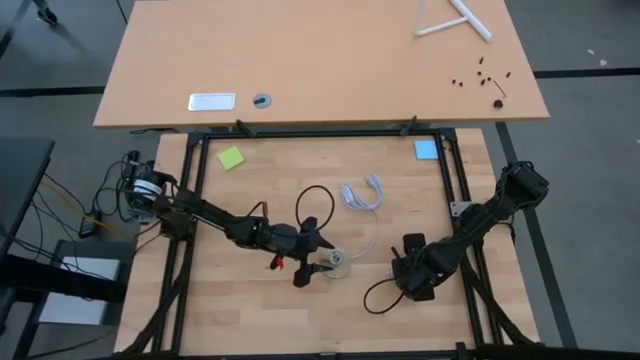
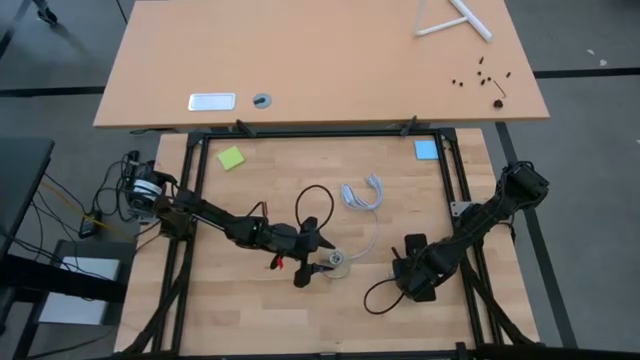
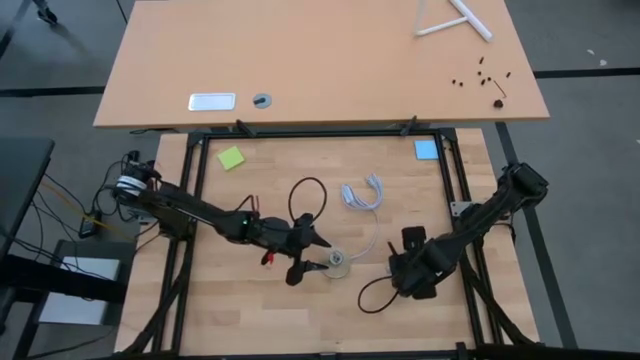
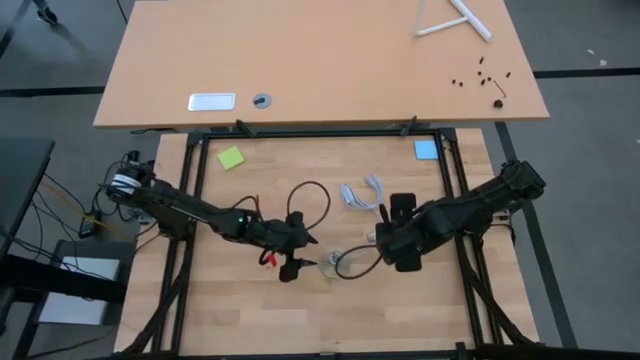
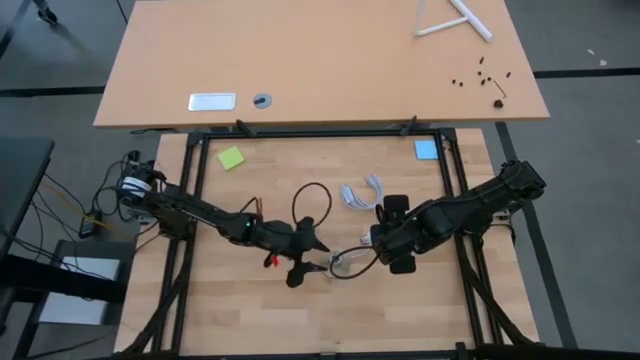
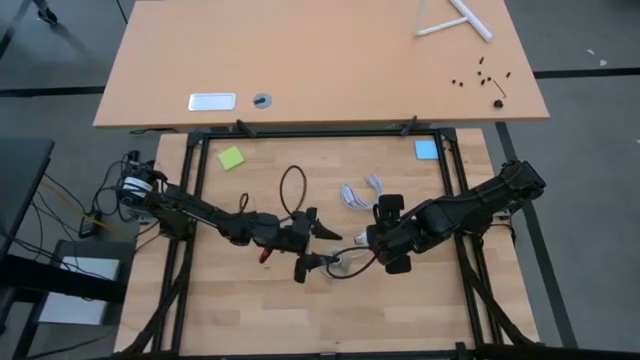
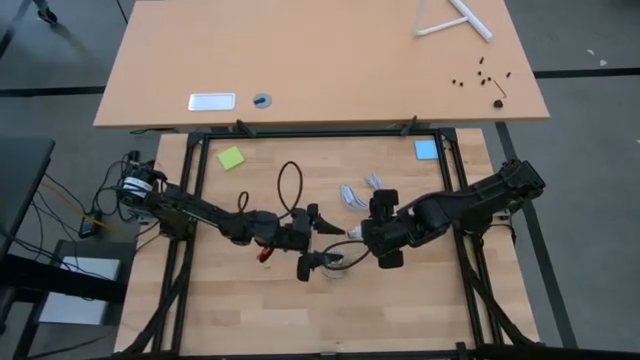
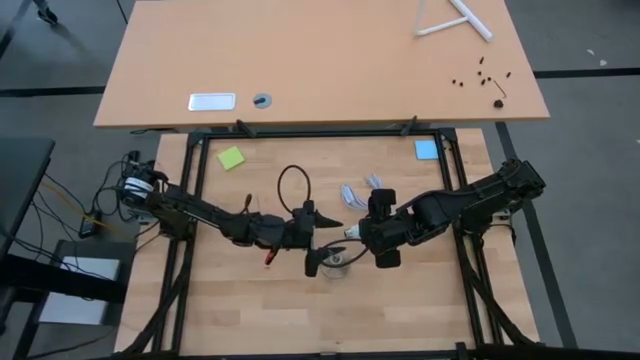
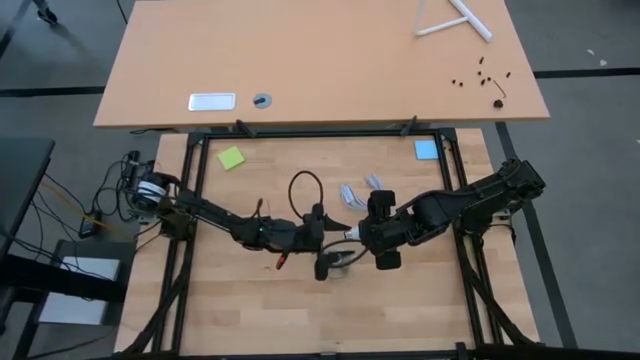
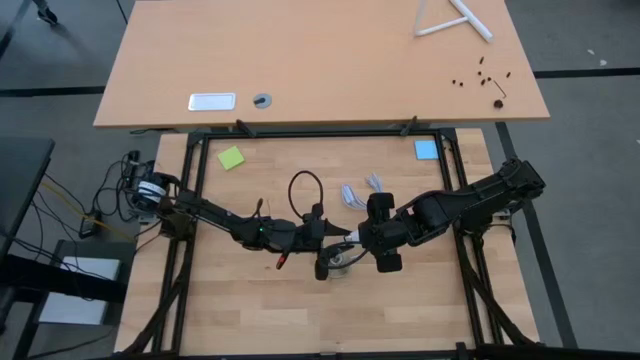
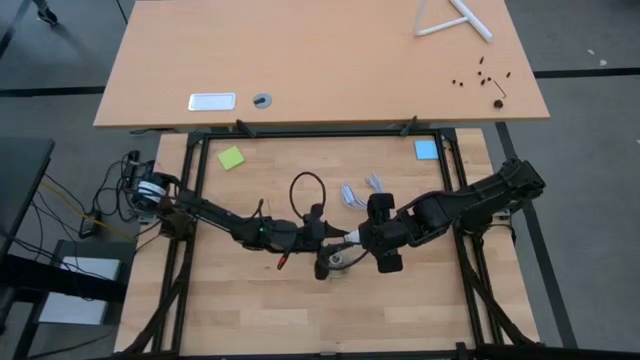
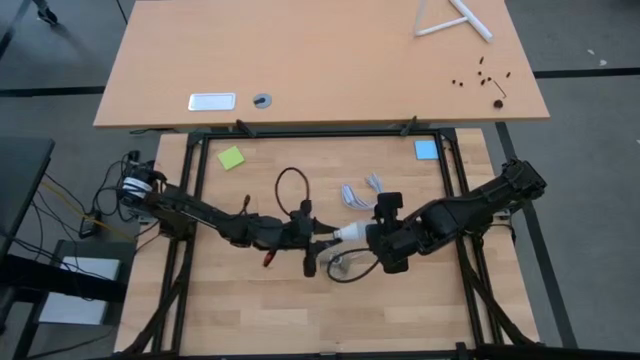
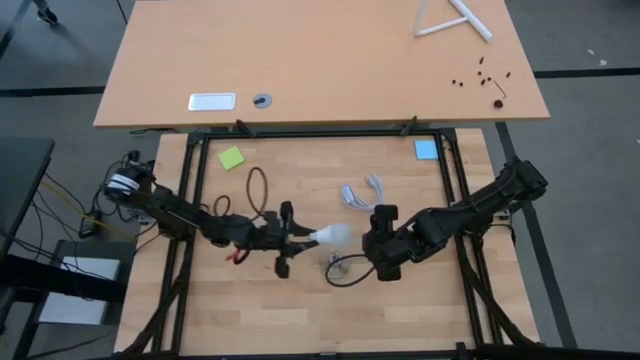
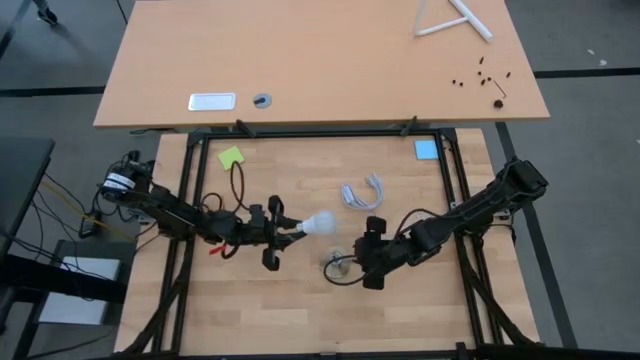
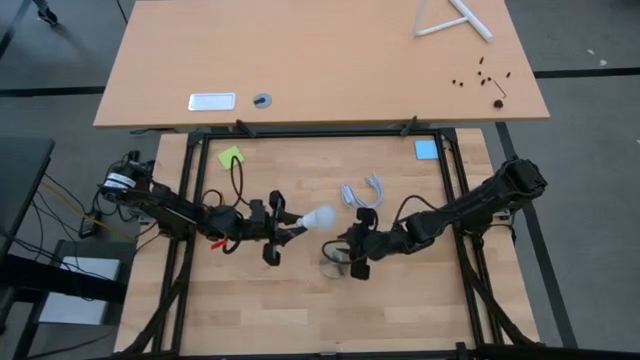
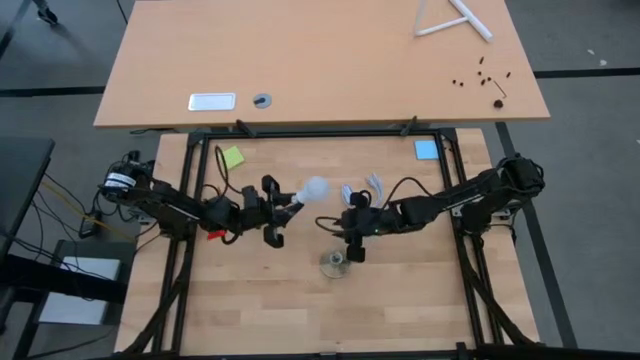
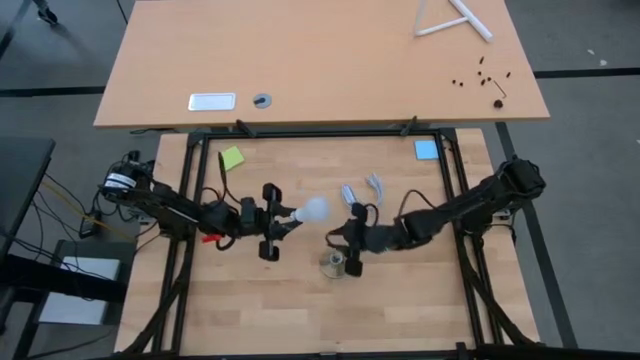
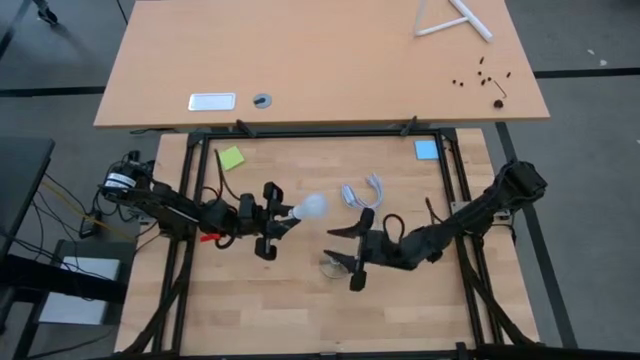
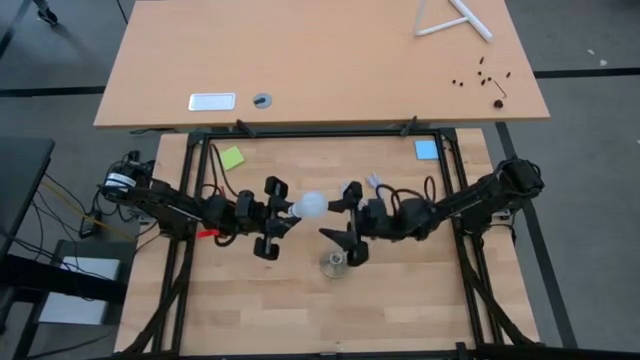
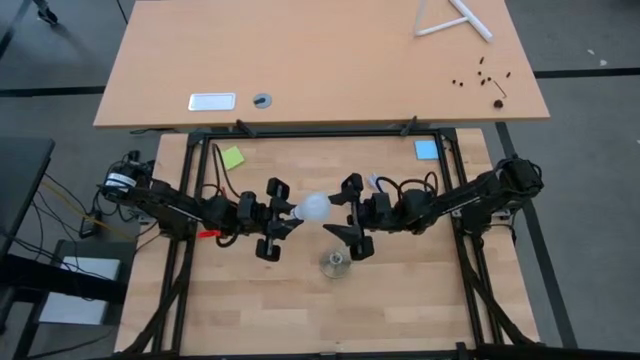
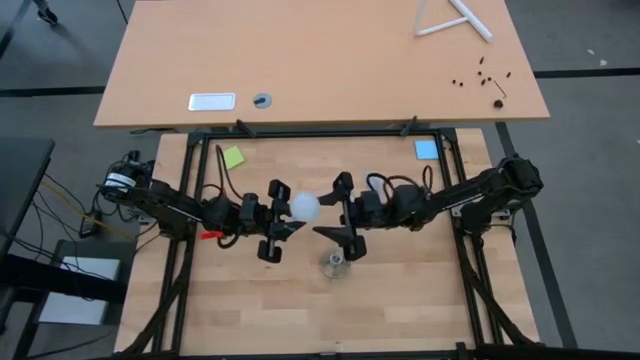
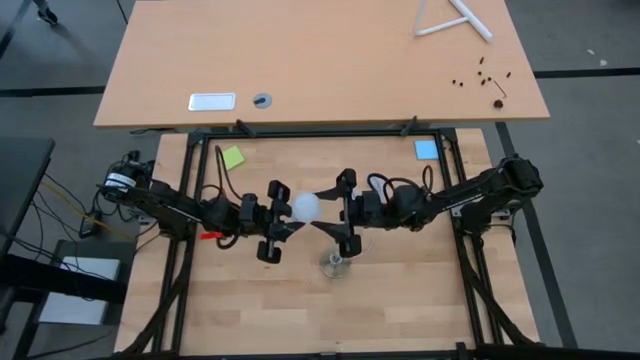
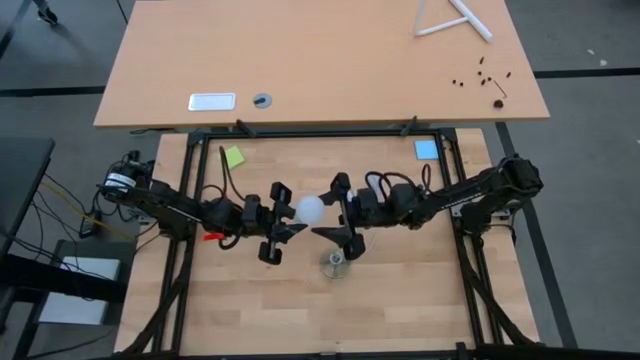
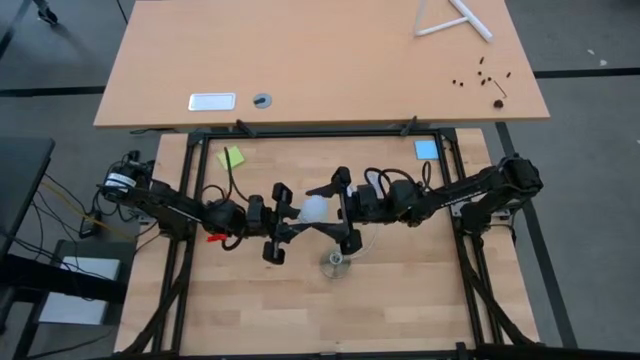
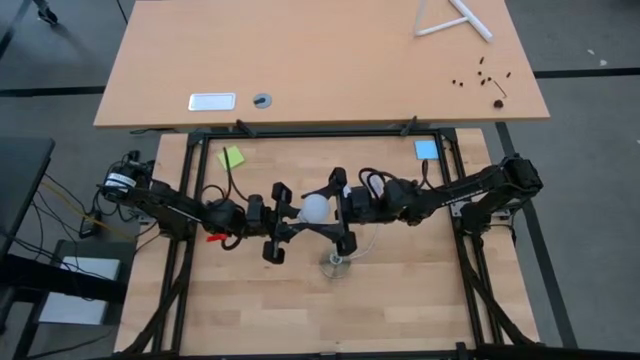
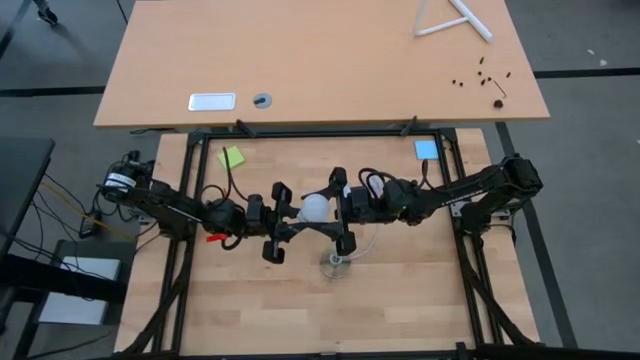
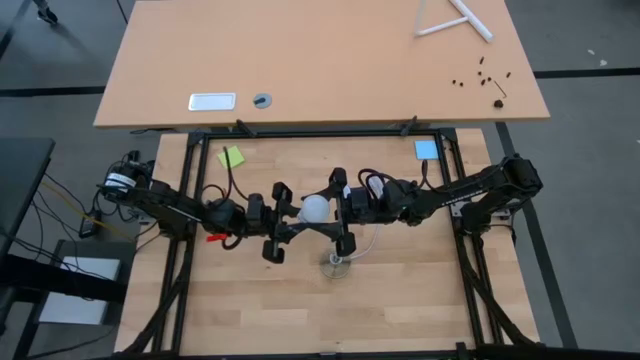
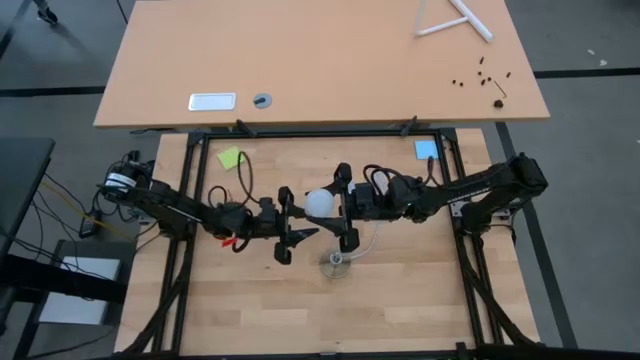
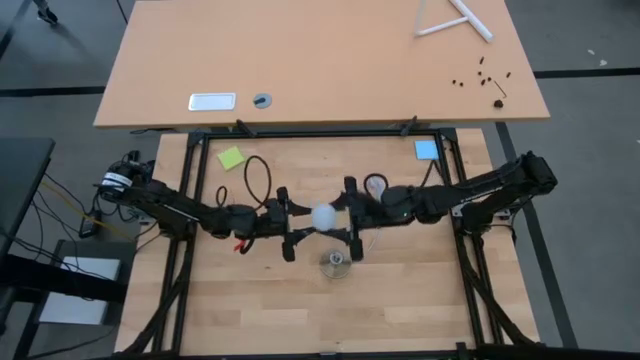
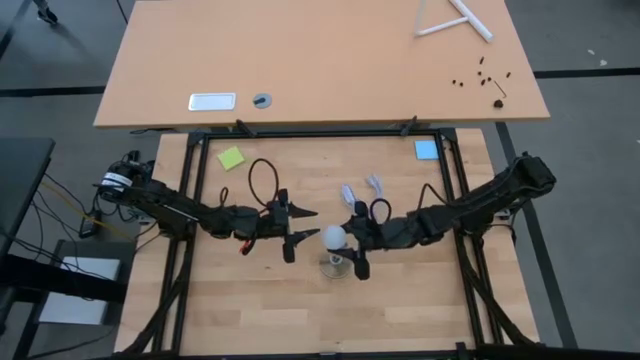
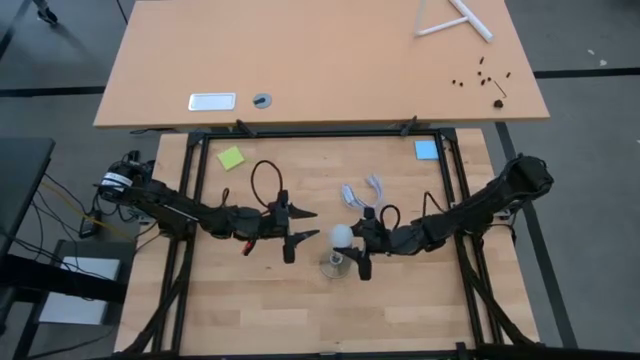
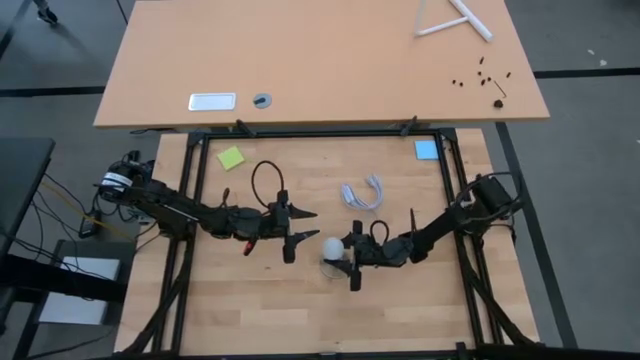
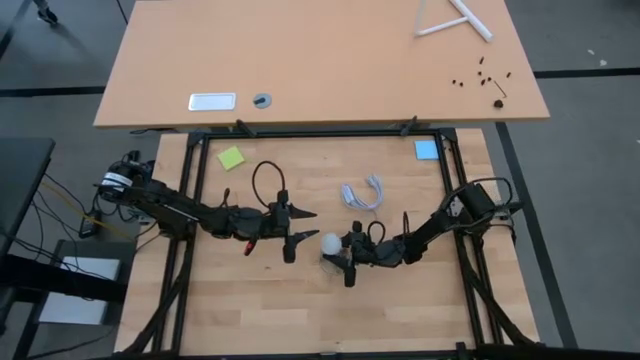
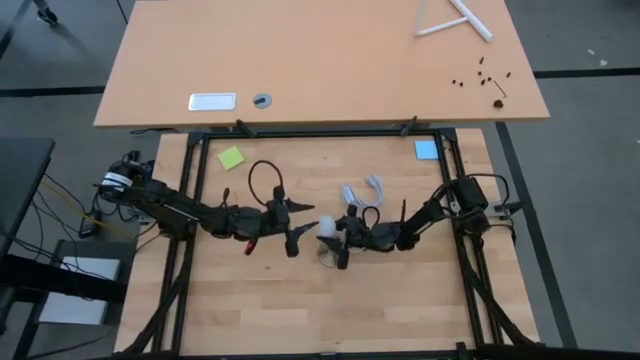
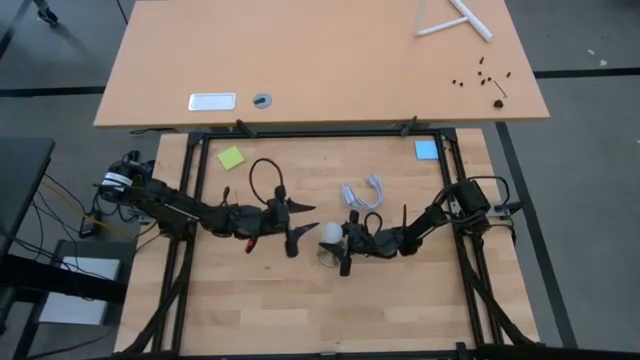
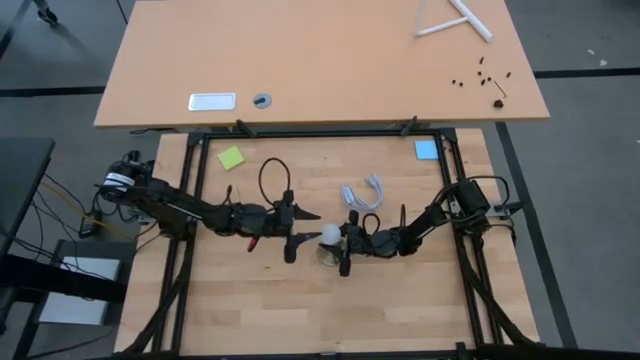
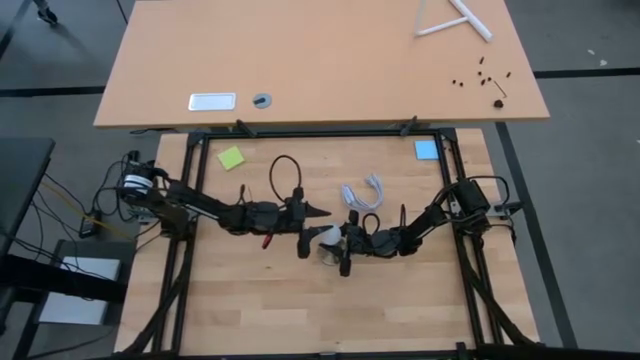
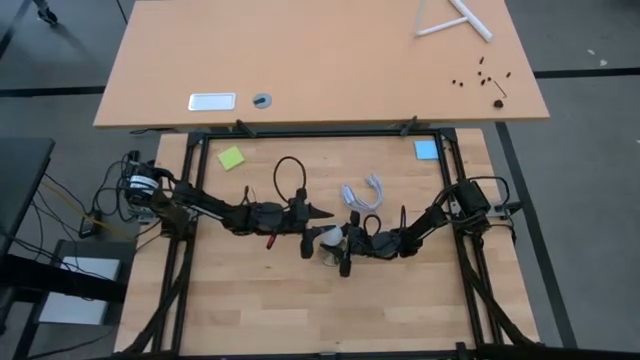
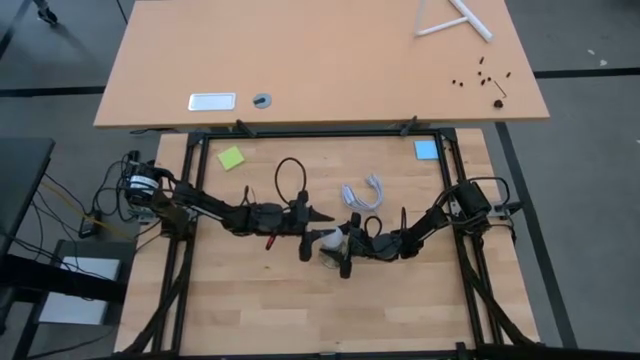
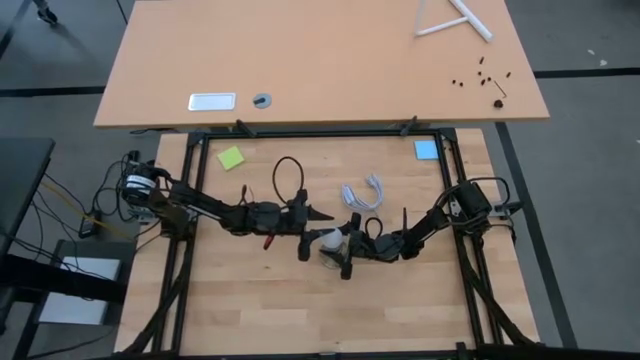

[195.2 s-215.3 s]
Task: Screw lightbulb
Insert the lightbulb into the lamp
